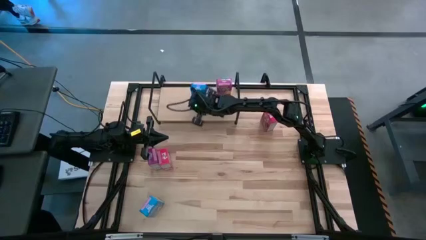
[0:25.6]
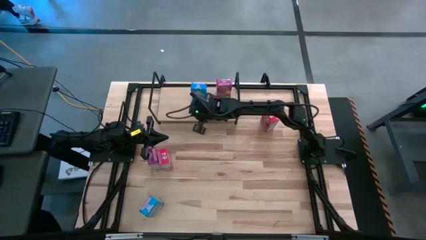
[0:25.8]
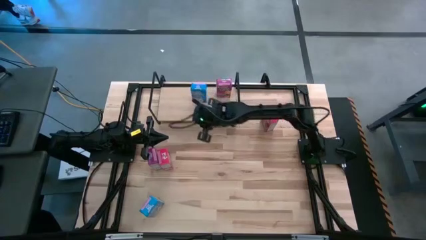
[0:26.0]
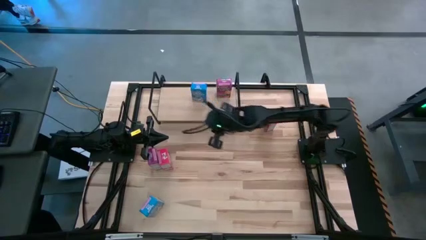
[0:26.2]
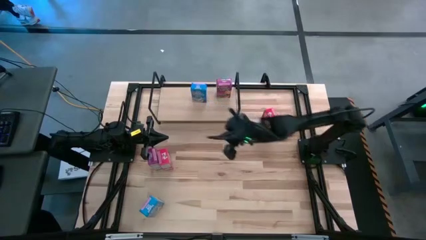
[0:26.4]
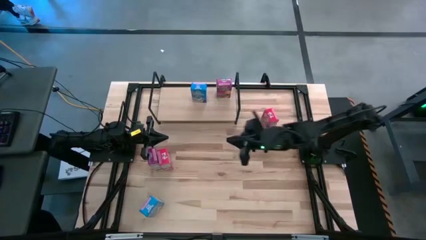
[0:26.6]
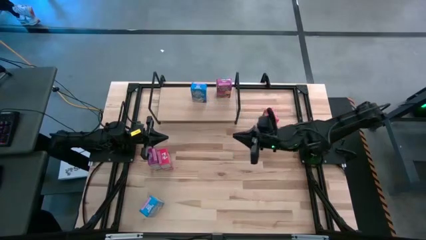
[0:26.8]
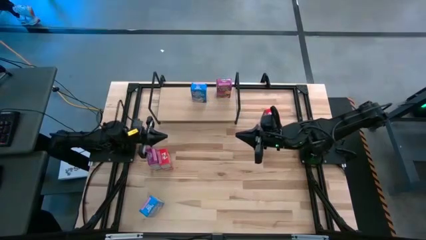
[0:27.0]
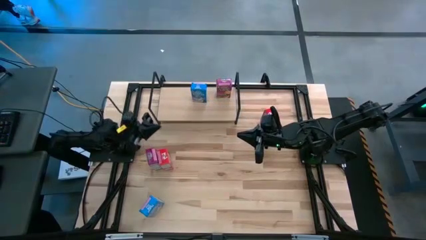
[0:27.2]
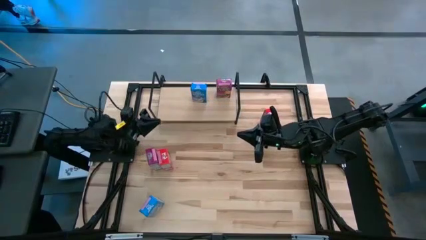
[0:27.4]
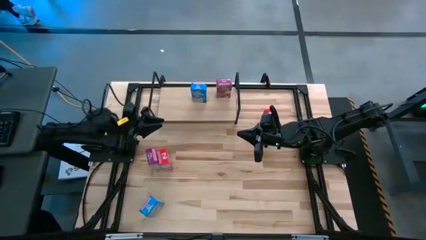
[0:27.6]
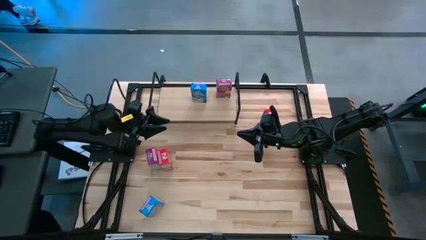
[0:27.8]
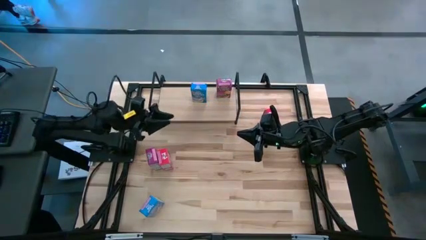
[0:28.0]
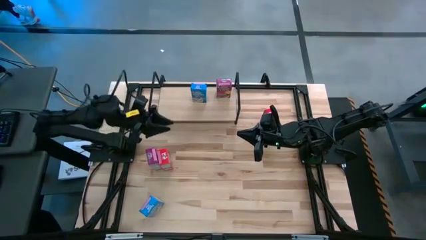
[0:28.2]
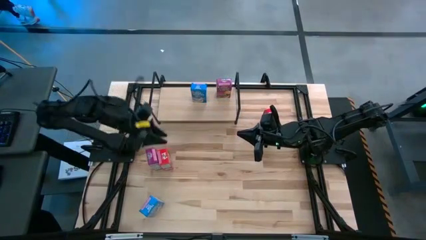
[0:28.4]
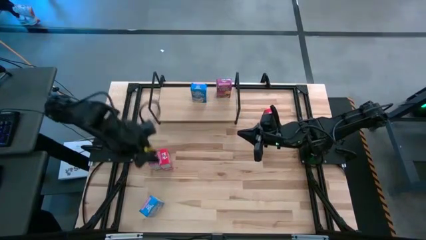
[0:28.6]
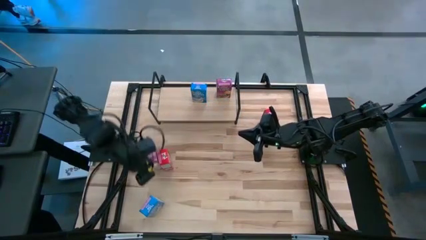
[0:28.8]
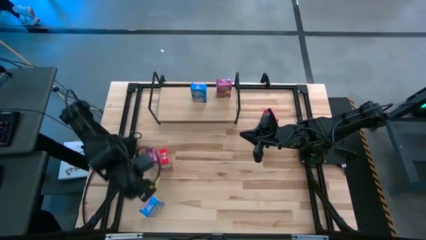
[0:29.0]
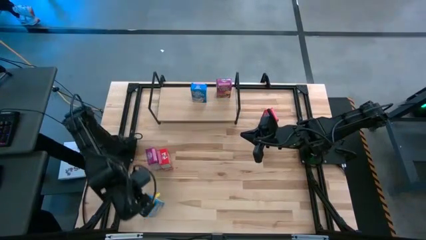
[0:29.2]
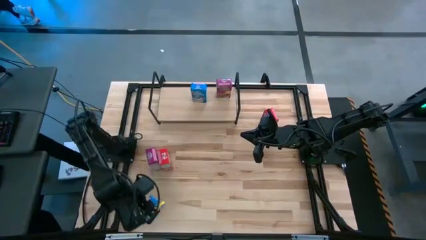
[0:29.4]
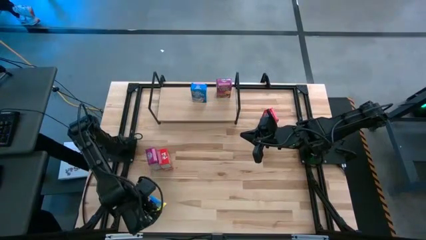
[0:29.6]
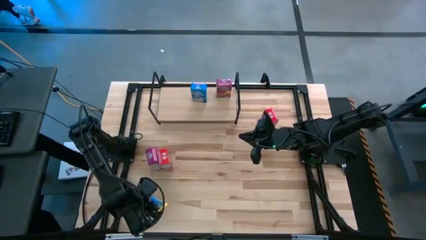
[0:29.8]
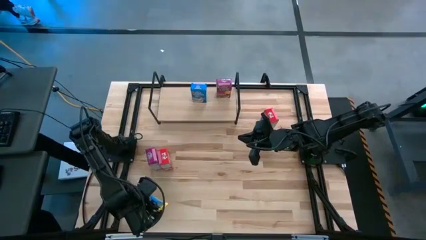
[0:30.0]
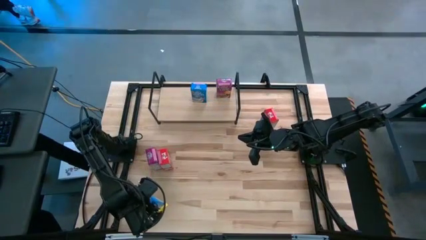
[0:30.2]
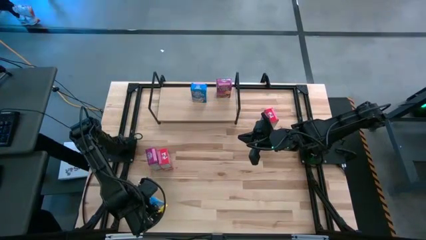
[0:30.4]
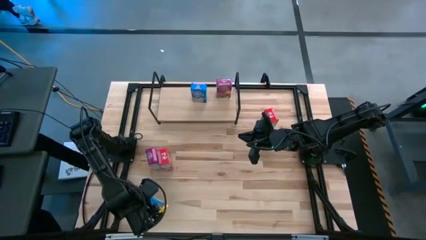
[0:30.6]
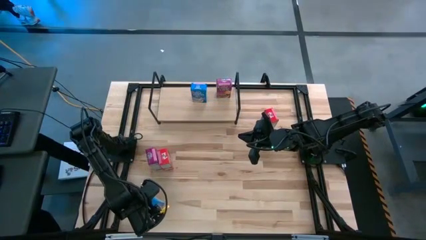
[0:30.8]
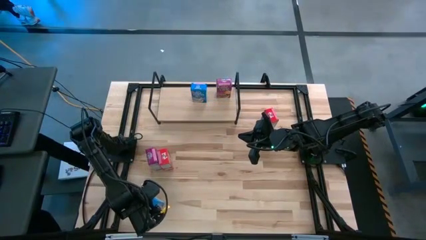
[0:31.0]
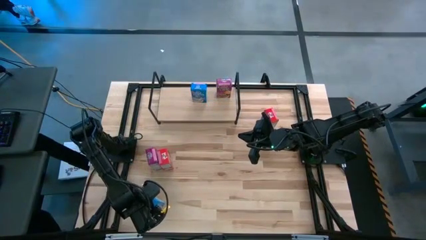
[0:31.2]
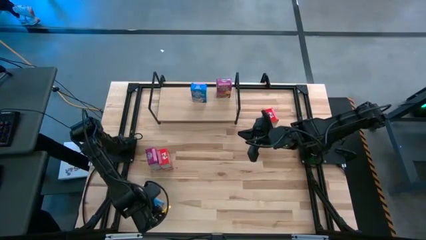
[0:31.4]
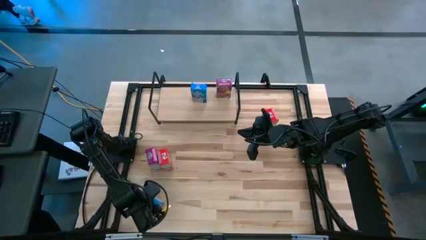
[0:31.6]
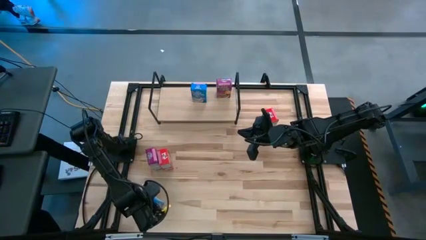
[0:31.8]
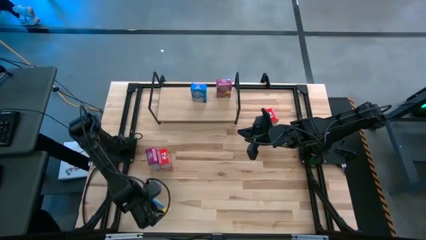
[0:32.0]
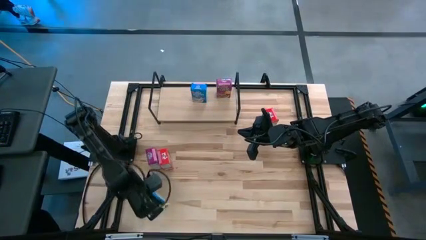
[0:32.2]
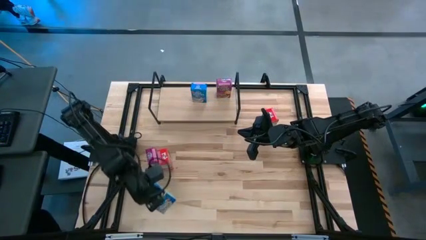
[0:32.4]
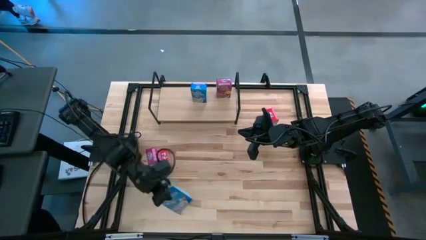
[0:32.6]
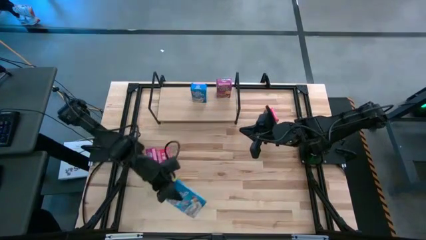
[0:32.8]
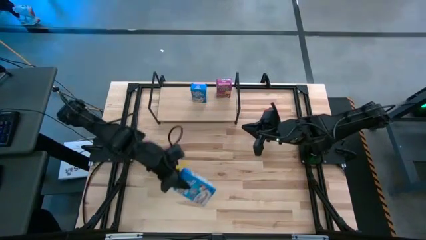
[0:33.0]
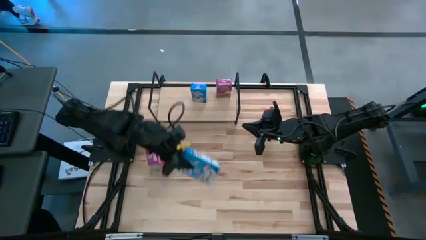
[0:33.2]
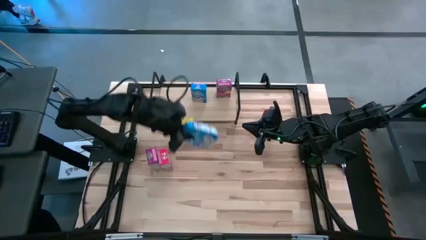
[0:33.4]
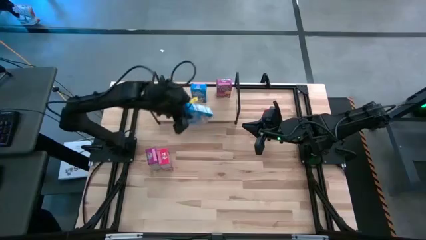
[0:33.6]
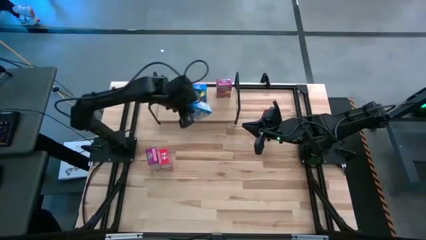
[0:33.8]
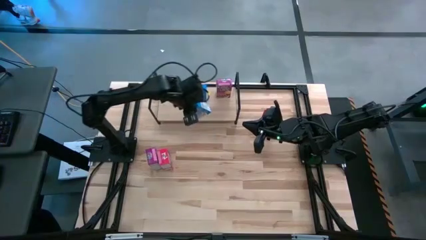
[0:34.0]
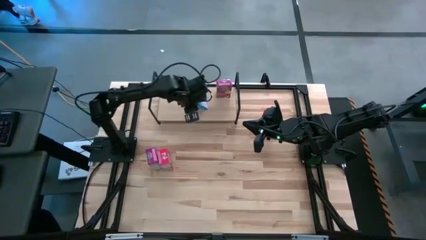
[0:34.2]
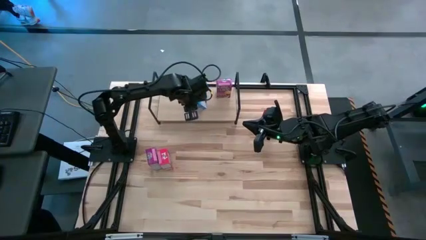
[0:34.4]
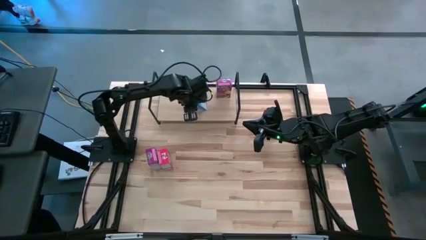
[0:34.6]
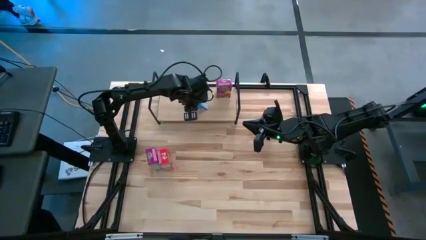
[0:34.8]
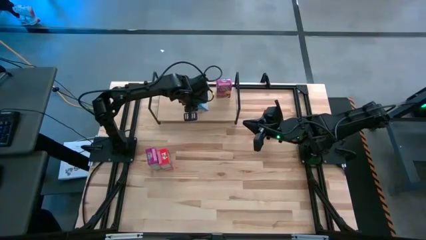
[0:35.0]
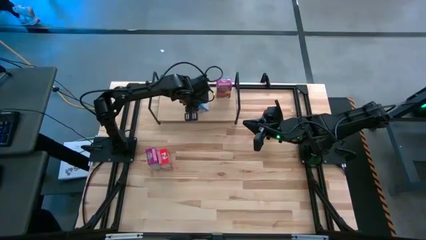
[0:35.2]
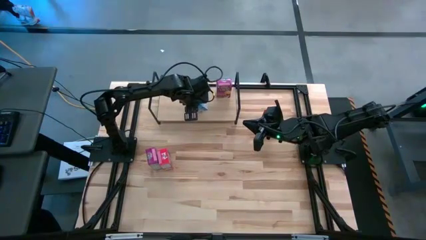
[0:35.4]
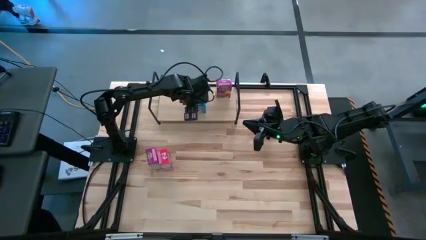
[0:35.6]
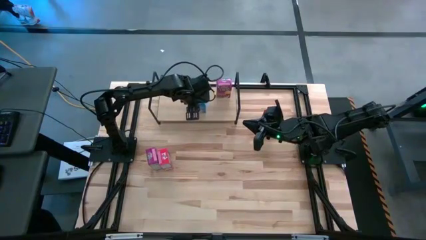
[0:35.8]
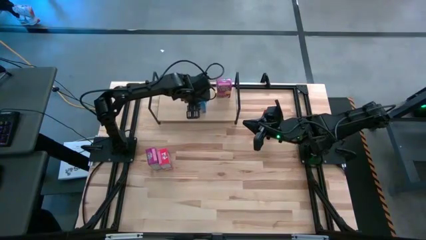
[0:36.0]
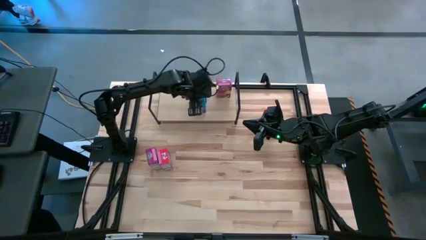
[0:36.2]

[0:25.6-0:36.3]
Task: Stack cereal on shelf
Put the blue cereal box on the shelf aligned with the other blue cereal box
